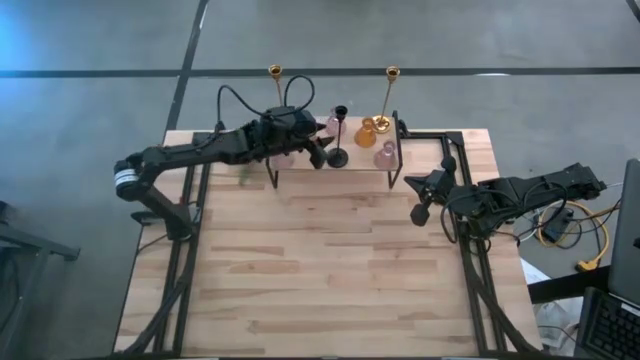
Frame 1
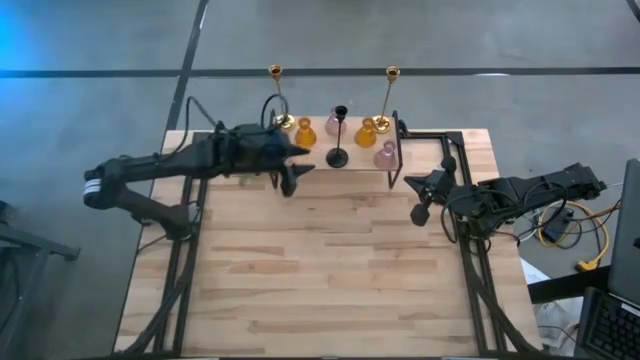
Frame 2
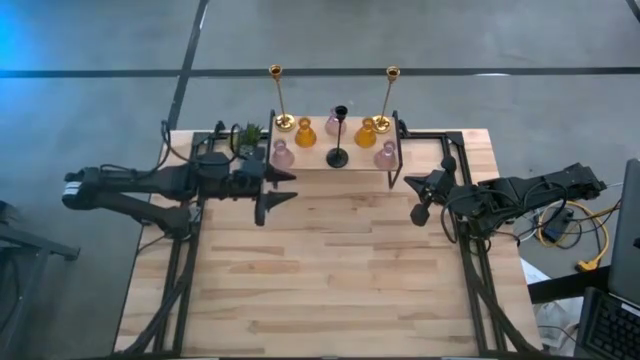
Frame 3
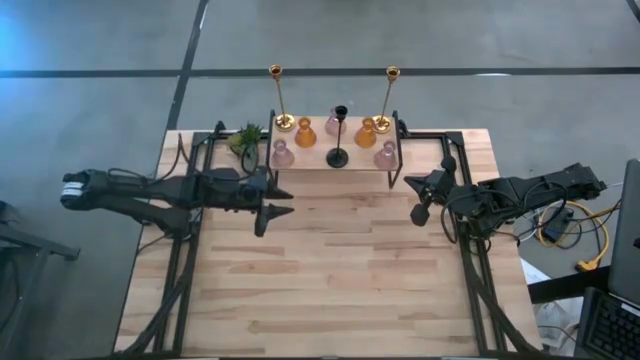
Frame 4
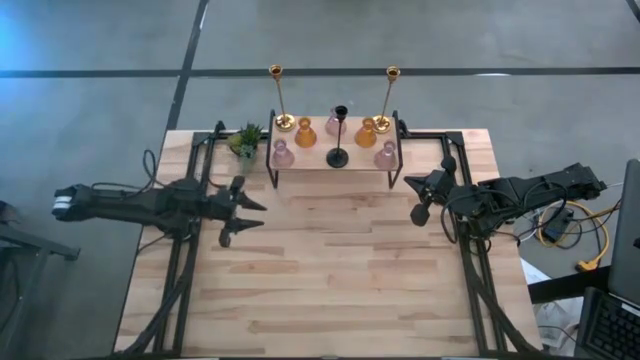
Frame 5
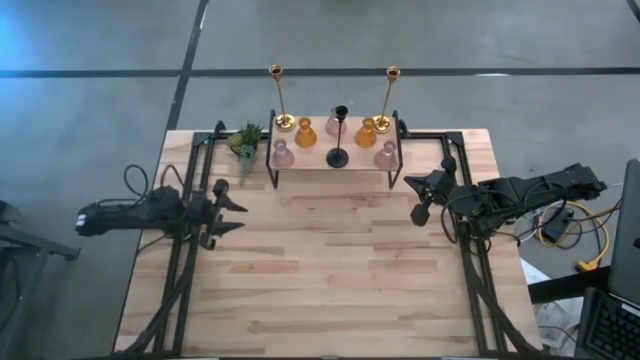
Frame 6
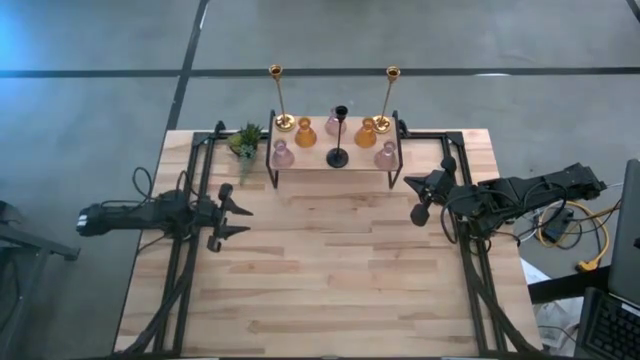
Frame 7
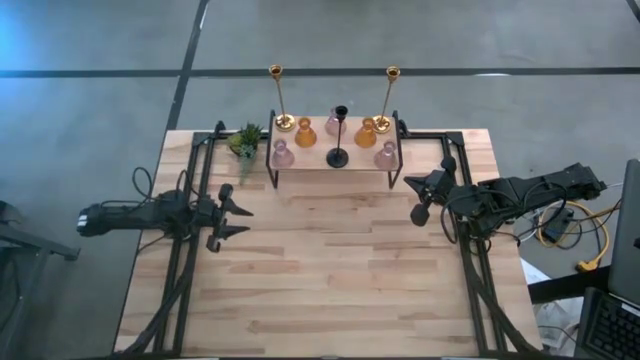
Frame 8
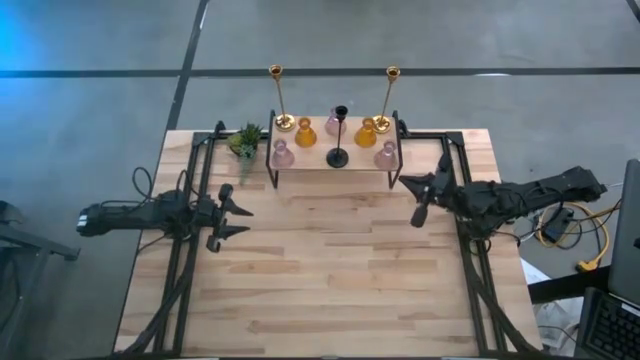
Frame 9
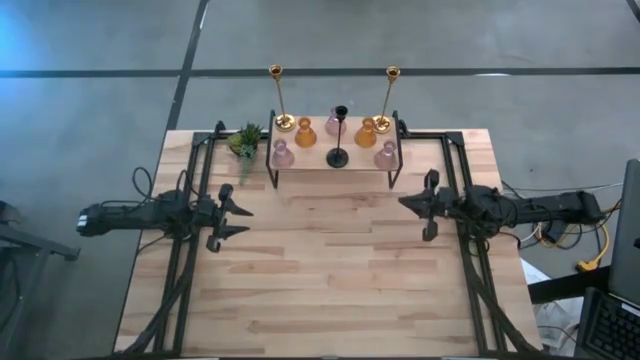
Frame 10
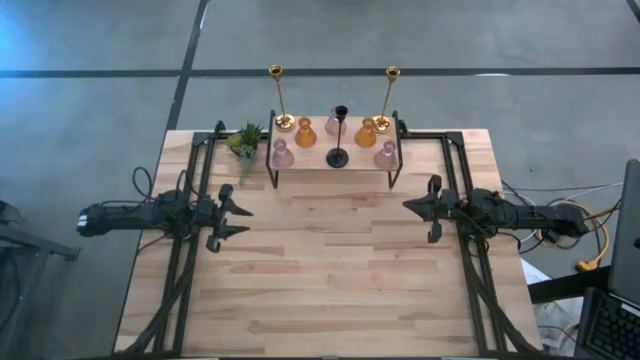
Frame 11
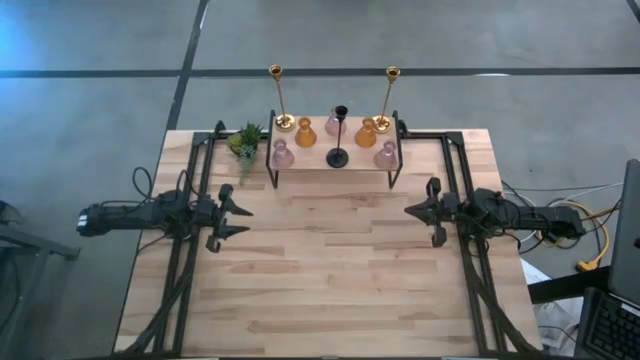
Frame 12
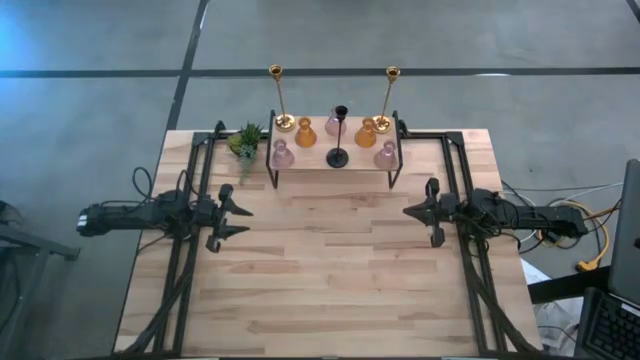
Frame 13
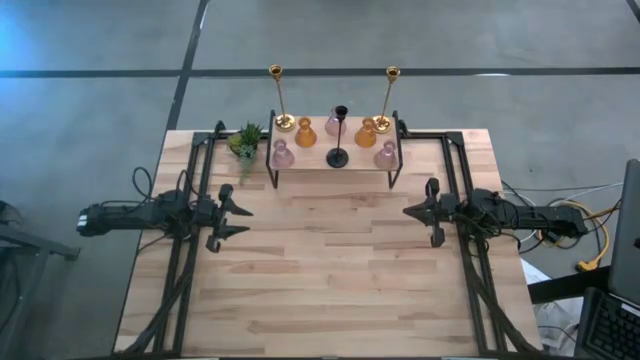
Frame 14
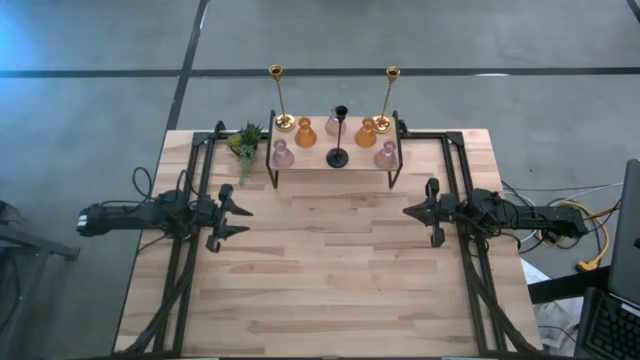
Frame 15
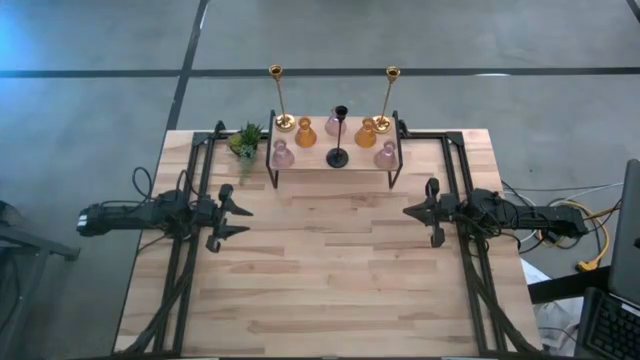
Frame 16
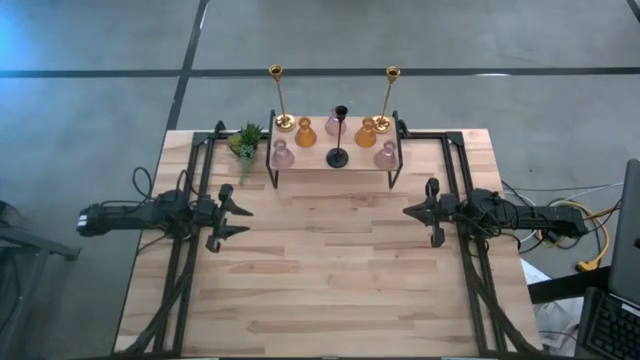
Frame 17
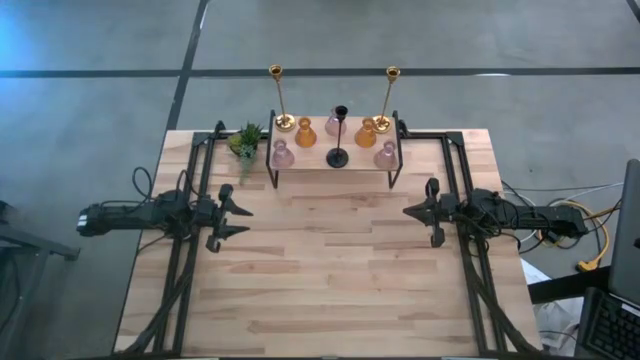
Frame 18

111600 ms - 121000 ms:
Task: Pick & Place candle stick holders
Return to Home Position

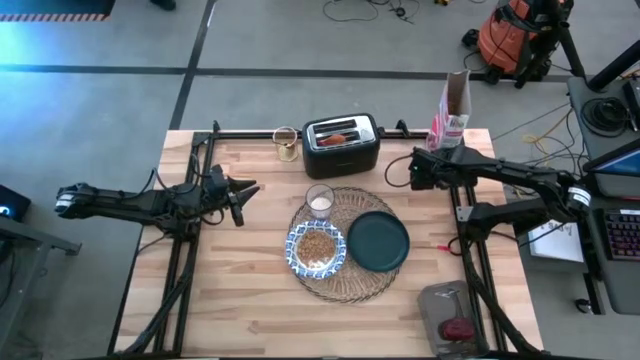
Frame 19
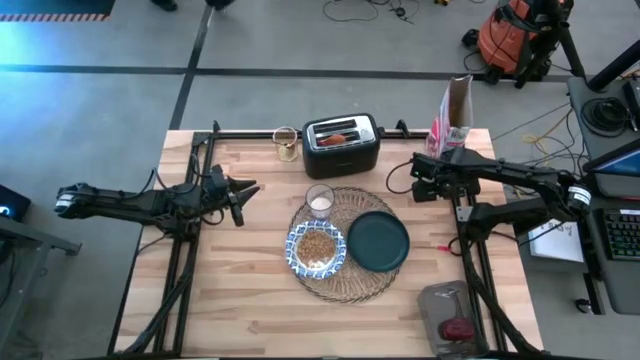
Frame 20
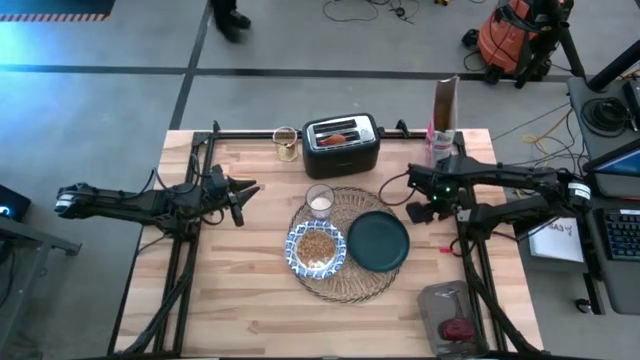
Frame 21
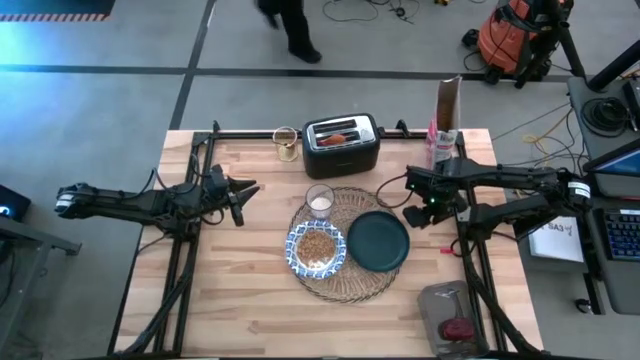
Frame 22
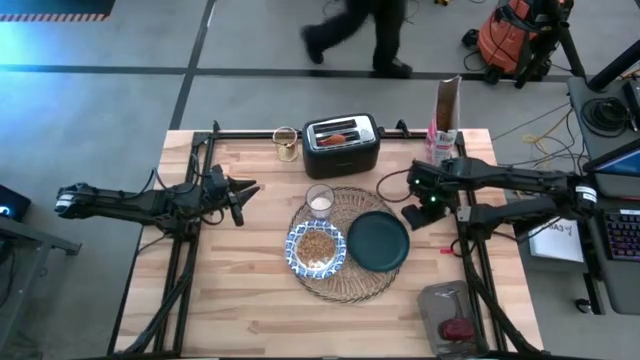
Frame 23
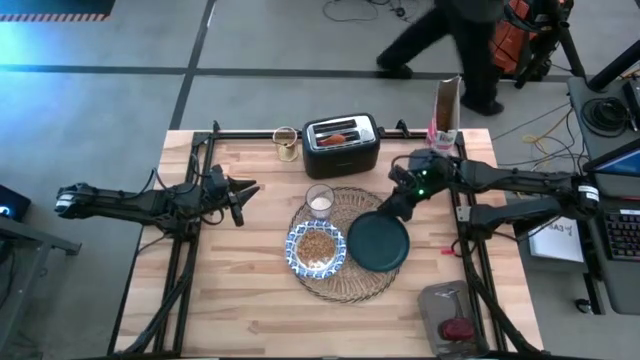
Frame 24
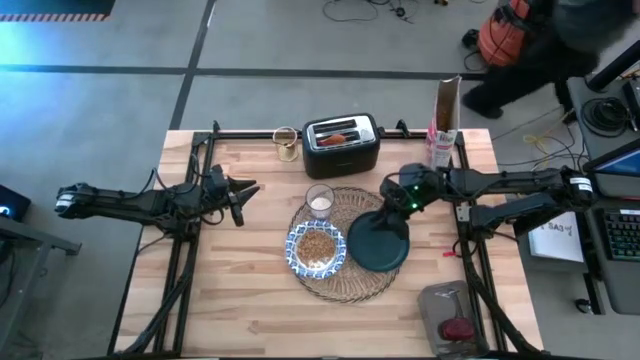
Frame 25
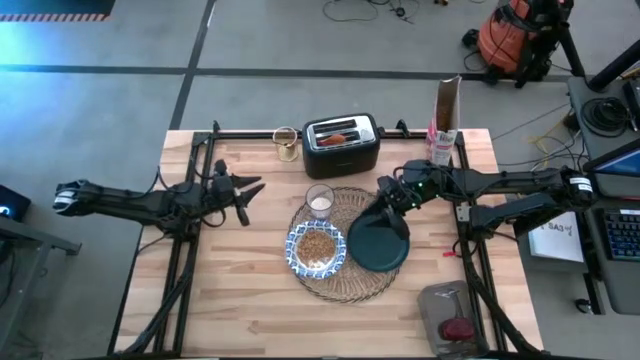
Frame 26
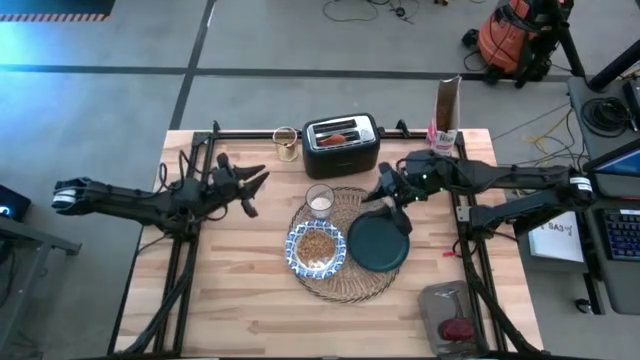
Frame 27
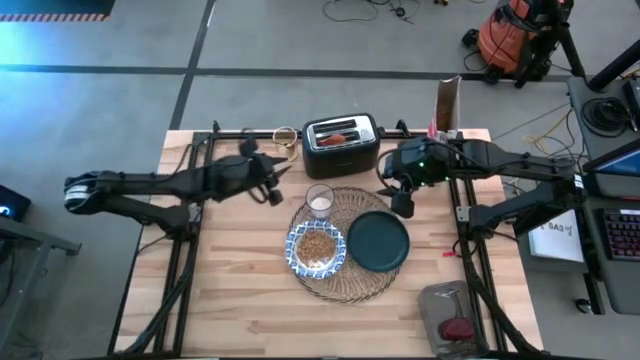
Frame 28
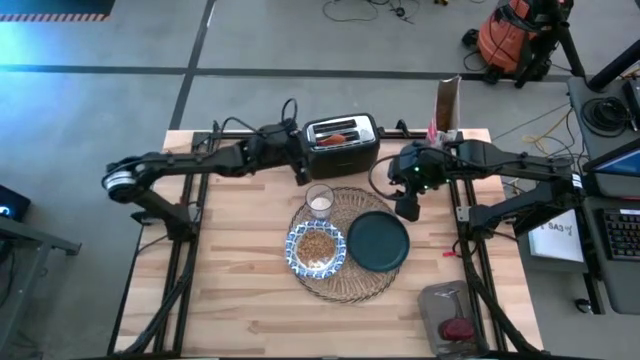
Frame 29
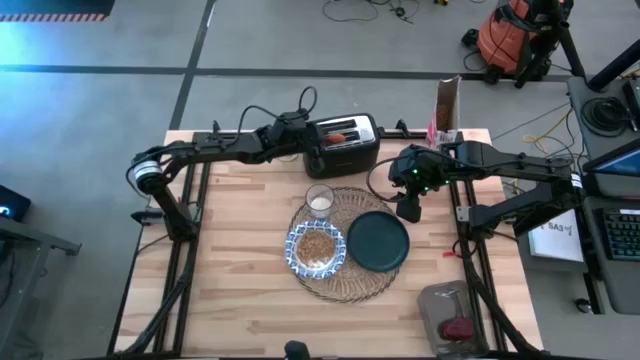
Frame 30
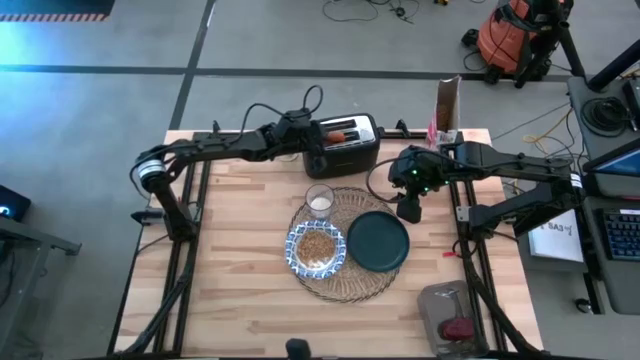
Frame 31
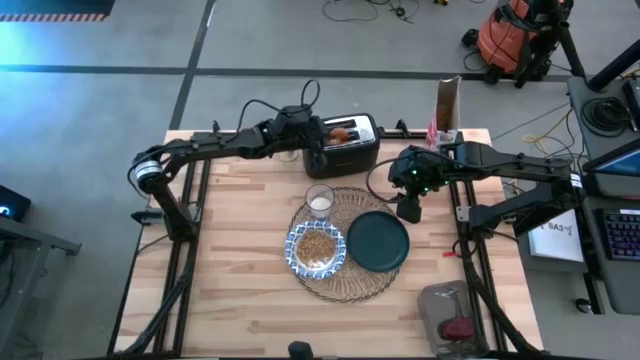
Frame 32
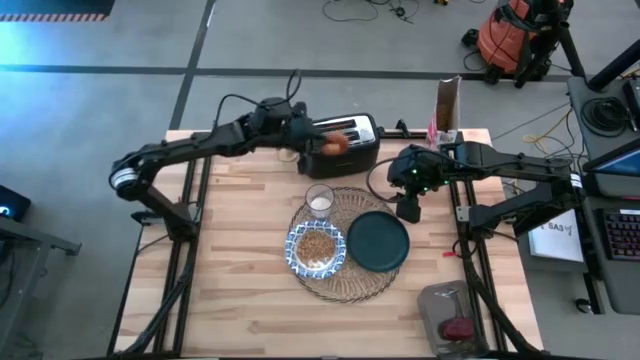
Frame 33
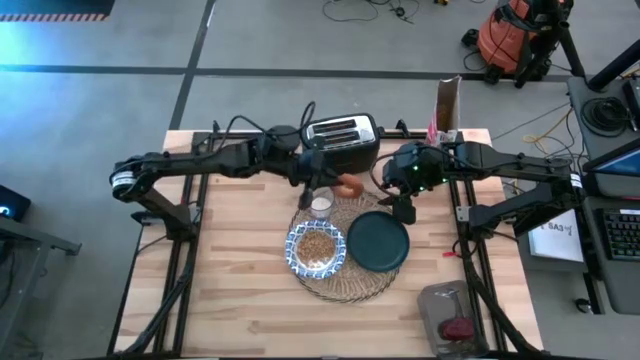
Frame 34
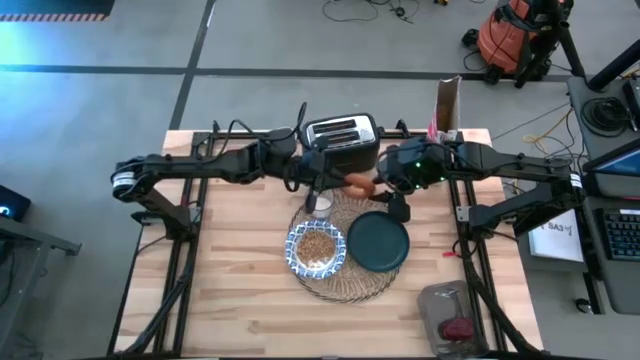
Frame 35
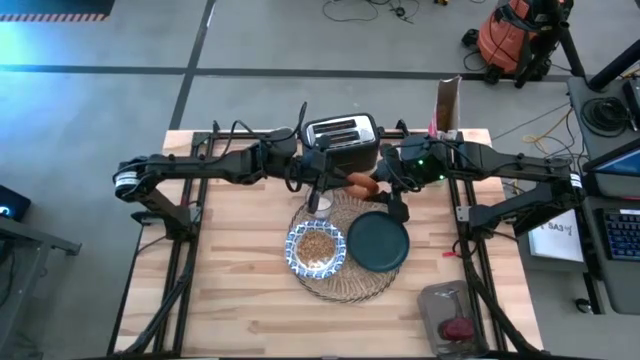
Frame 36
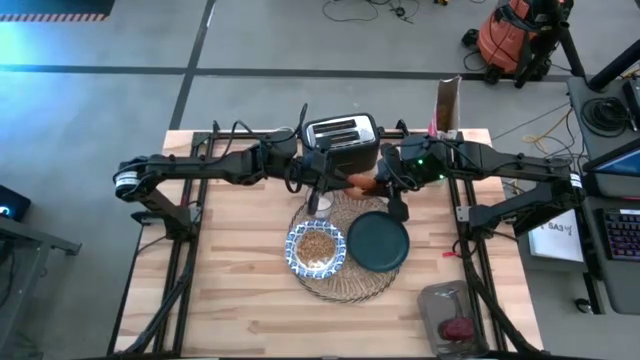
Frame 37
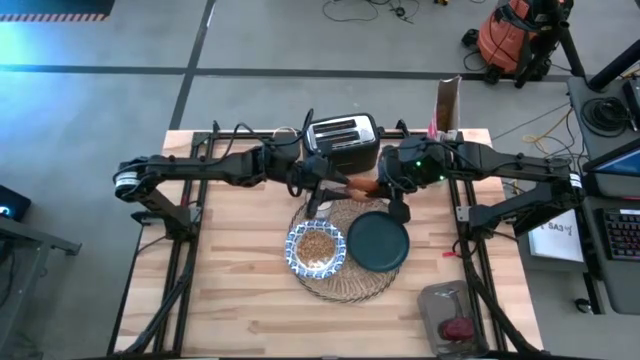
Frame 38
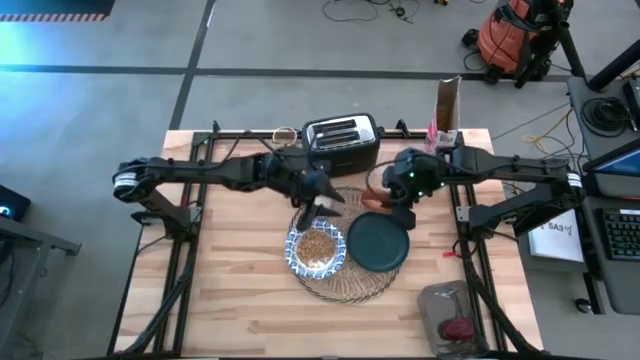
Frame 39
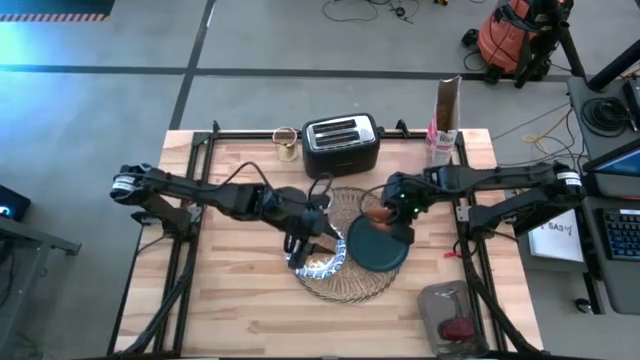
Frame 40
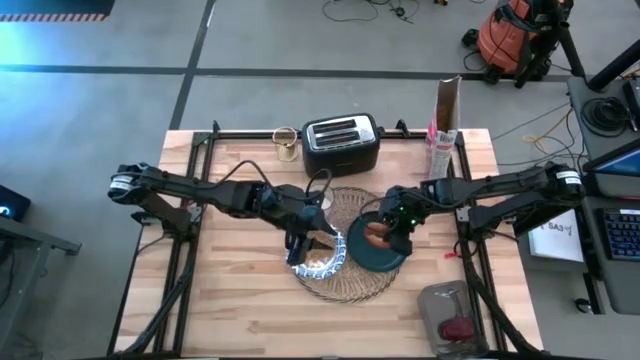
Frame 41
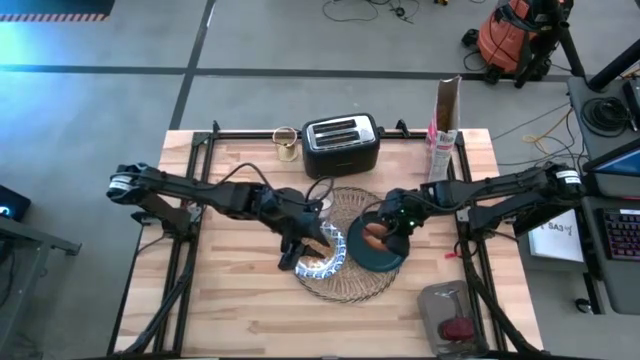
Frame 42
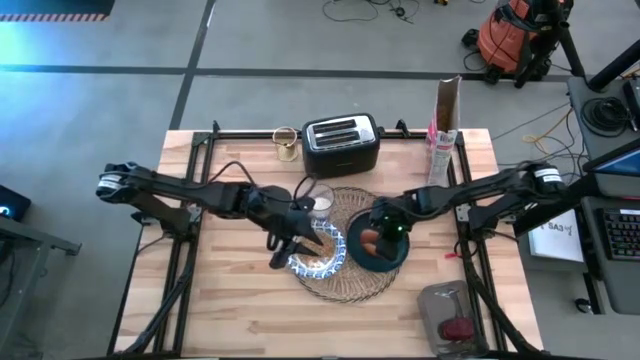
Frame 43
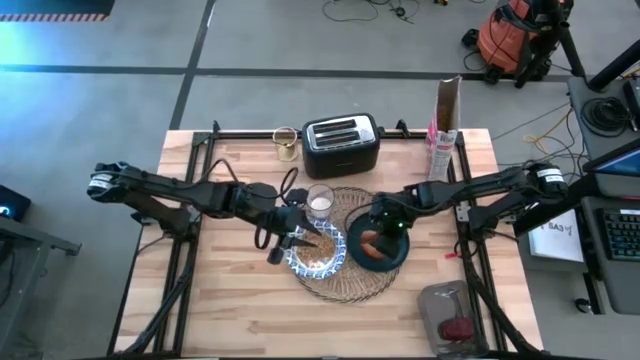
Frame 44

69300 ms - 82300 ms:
Task: Arrange a breakfast setting
Put the bagel on the blue plate
